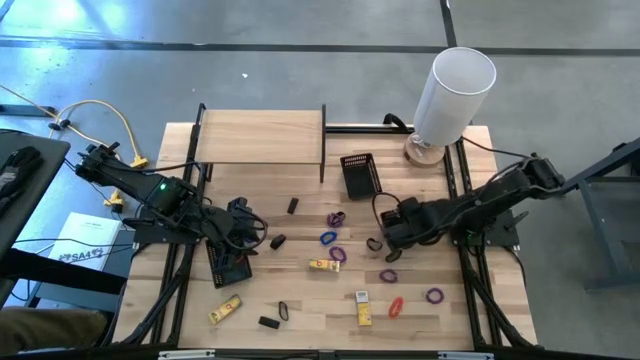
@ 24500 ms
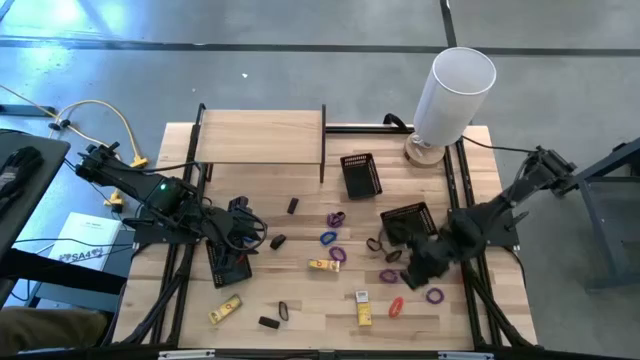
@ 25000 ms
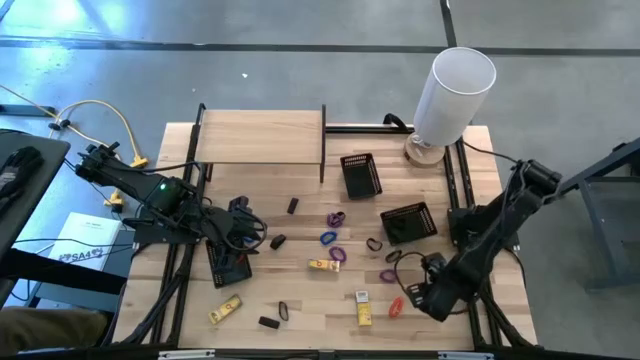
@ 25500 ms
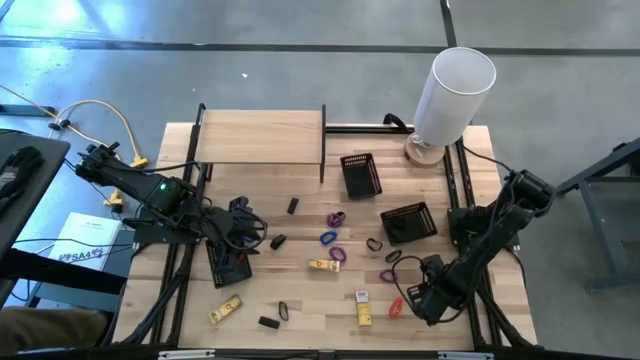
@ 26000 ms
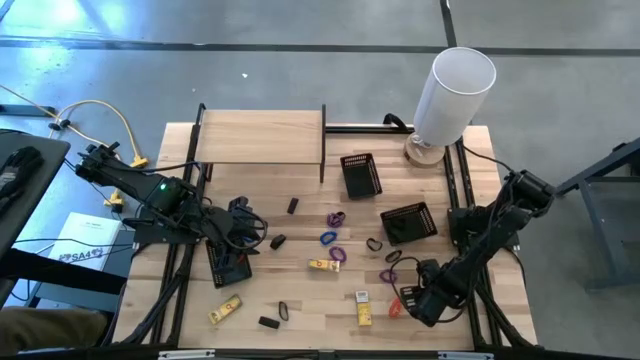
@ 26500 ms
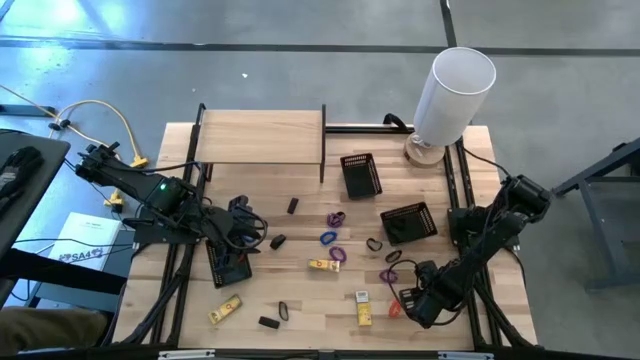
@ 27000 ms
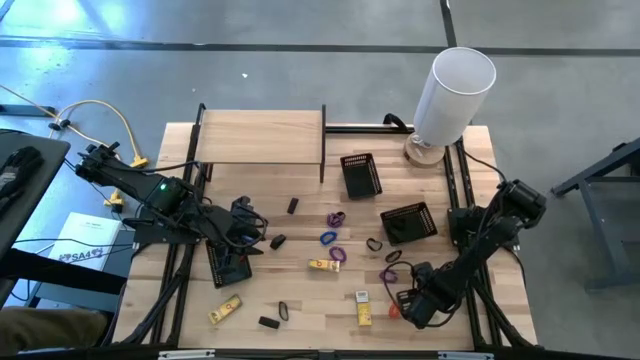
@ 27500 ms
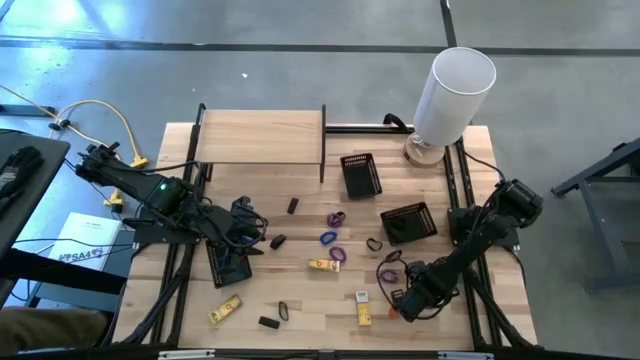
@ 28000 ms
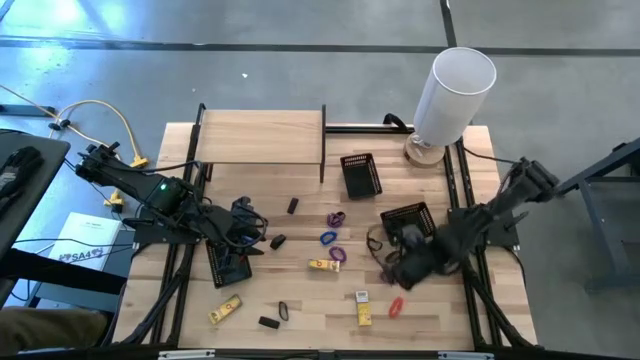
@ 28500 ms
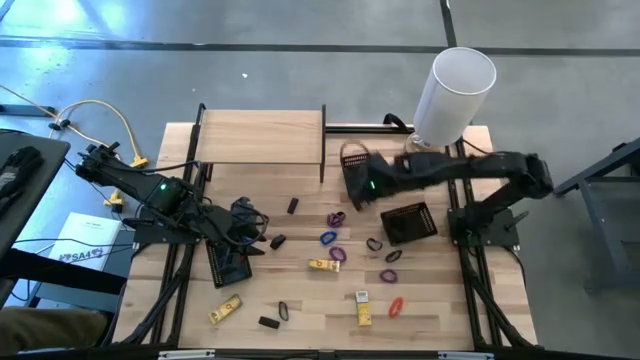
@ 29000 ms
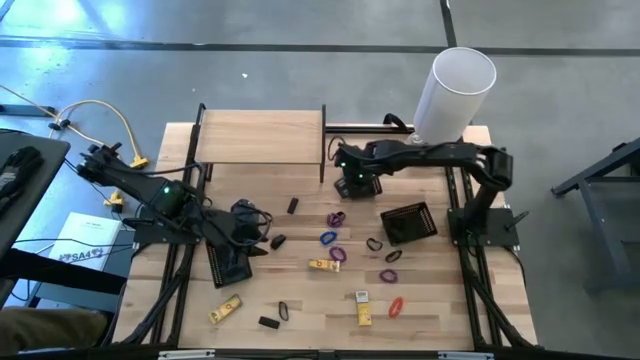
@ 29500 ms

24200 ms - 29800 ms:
Task: Pick & Place Office Desk Supplies
Put the purple spring keychain into the bottom left black bin

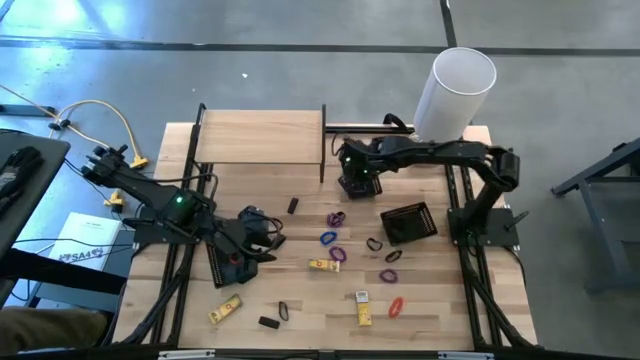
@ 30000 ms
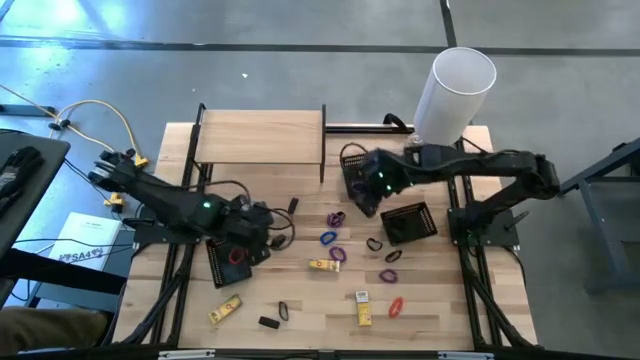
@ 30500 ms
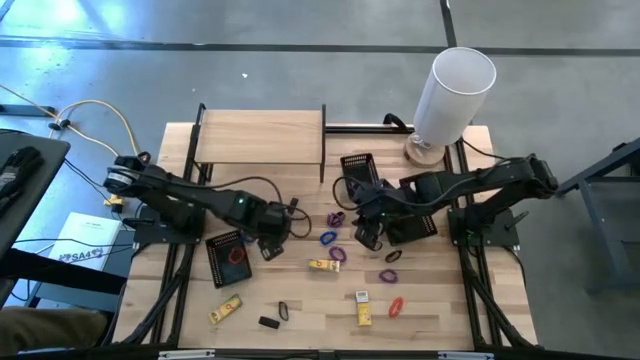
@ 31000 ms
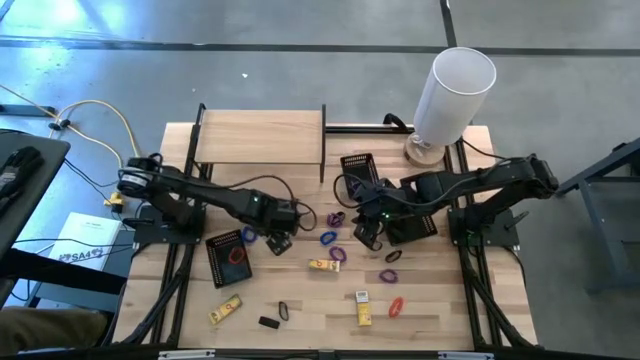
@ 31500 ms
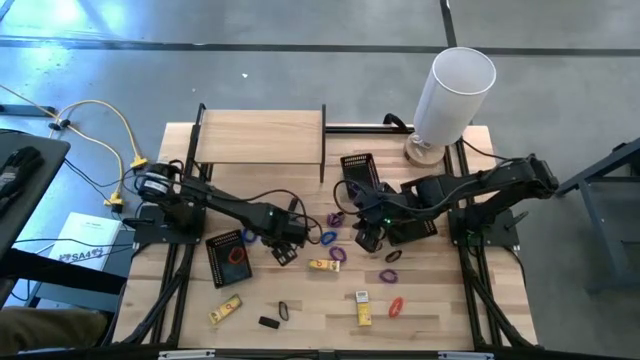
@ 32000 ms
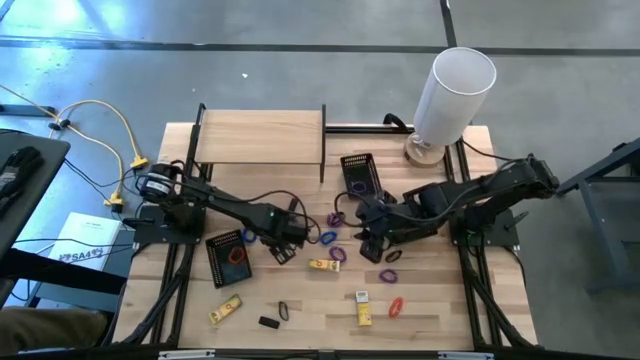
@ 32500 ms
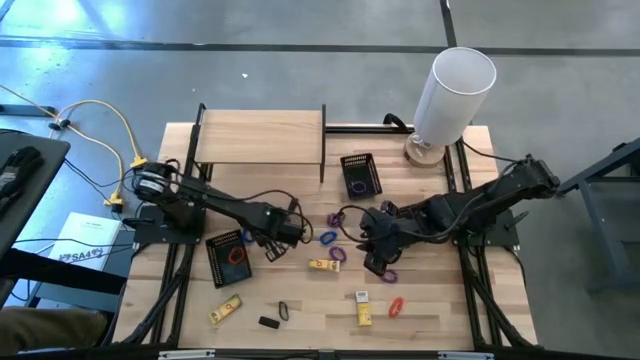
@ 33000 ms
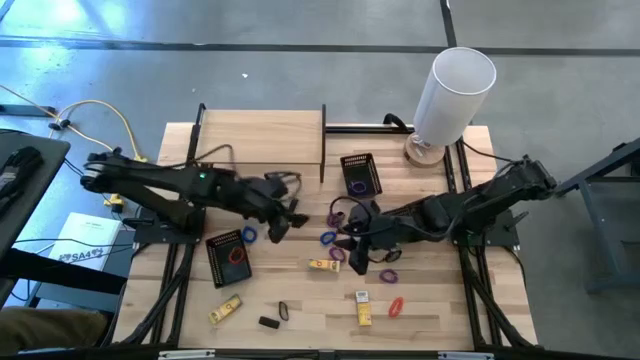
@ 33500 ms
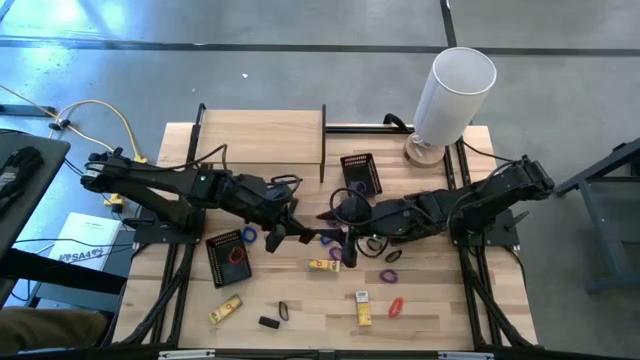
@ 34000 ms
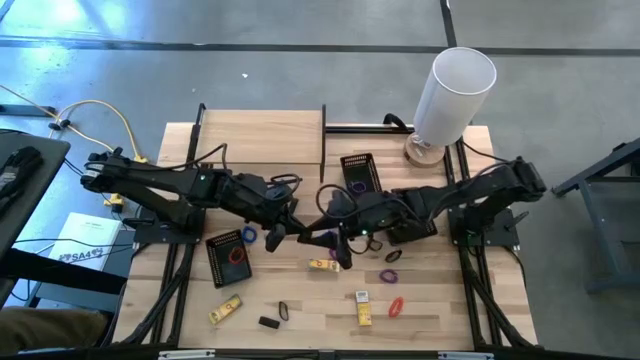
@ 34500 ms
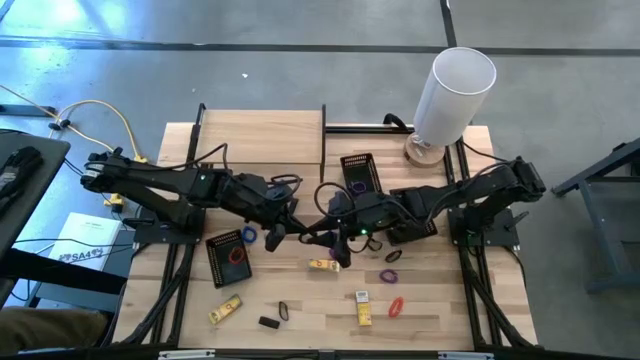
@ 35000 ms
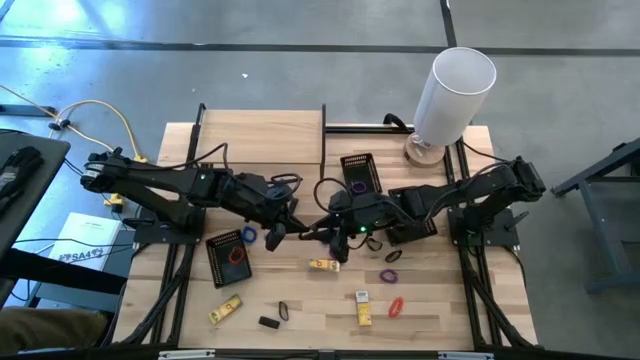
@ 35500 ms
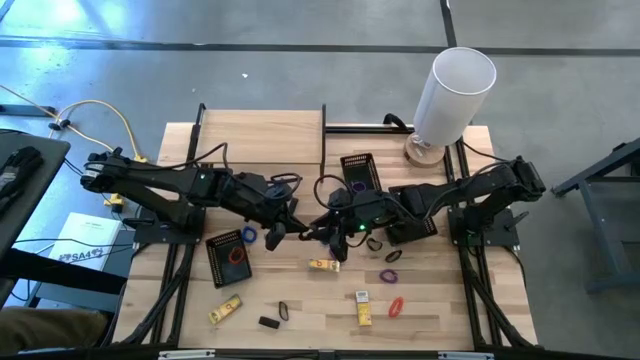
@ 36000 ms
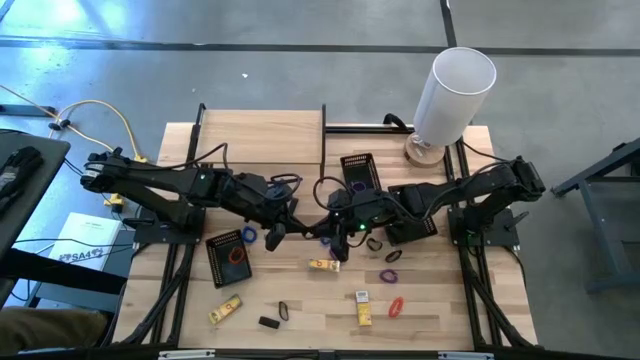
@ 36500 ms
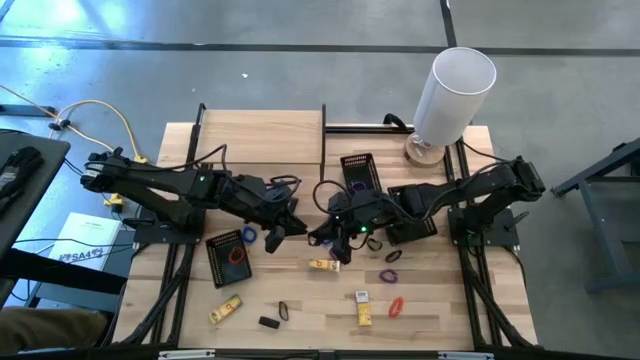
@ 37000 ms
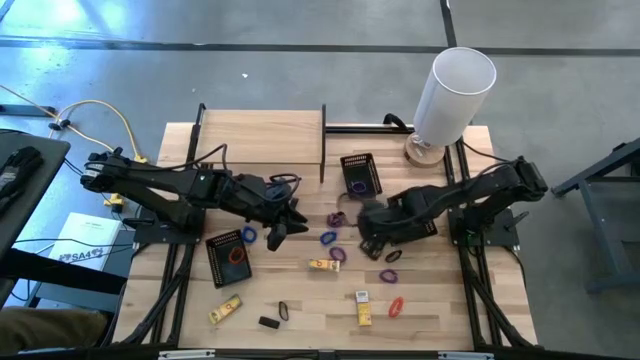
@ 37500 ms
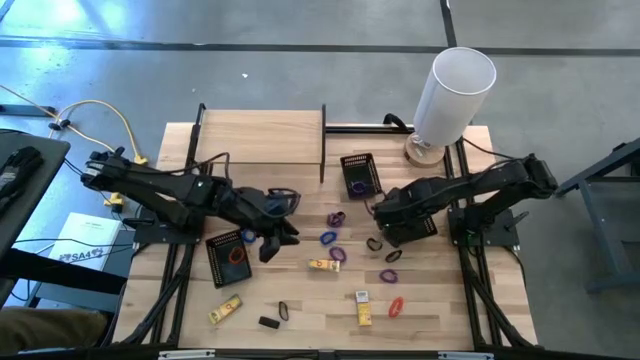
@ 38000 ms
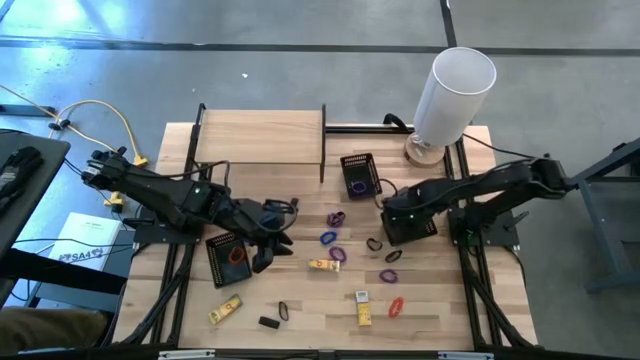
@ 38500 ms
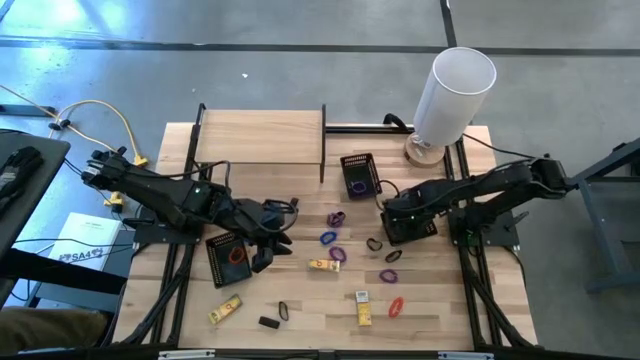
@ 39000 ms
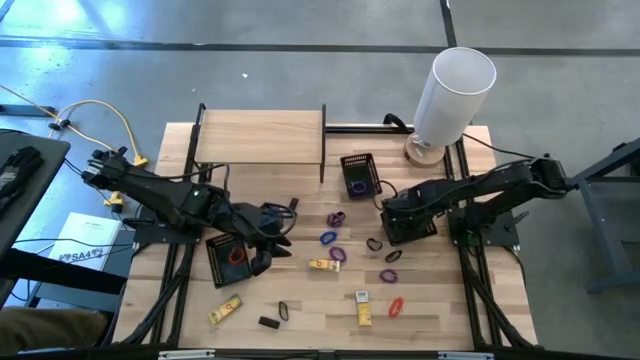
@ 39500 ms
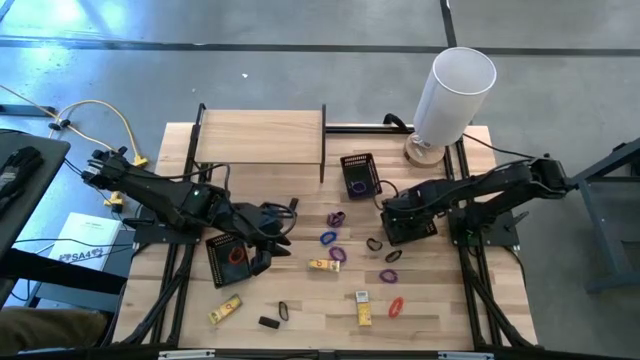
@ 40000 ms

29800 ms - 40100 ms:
Put the black rubberband into the bottom right black bin

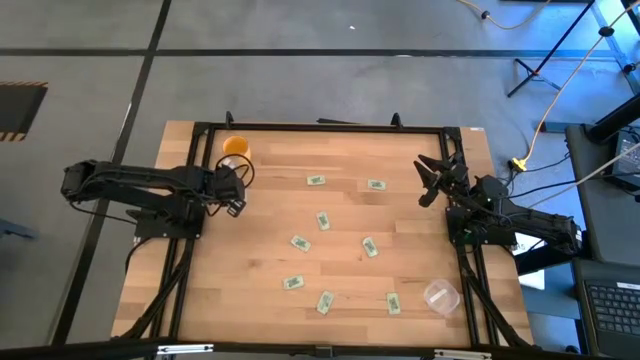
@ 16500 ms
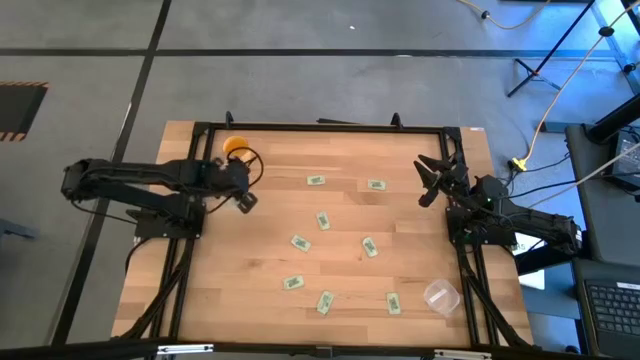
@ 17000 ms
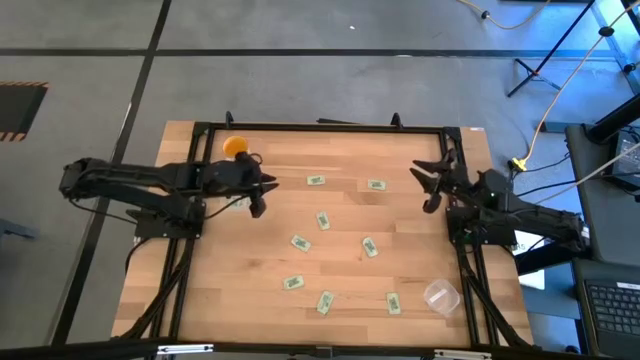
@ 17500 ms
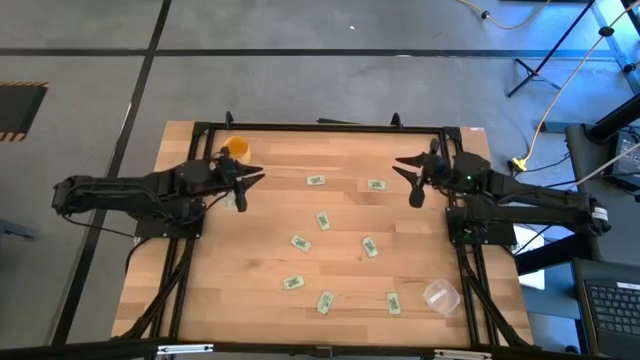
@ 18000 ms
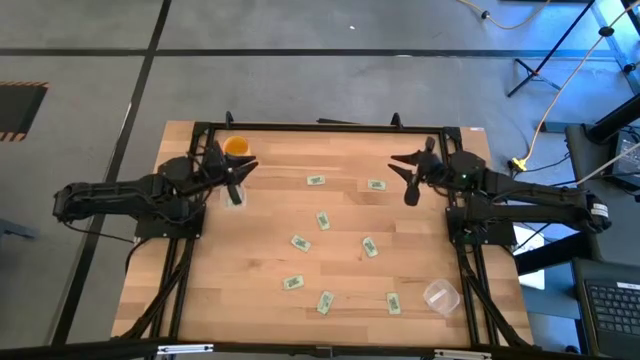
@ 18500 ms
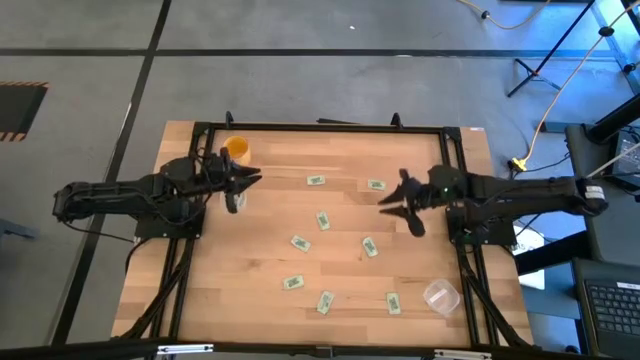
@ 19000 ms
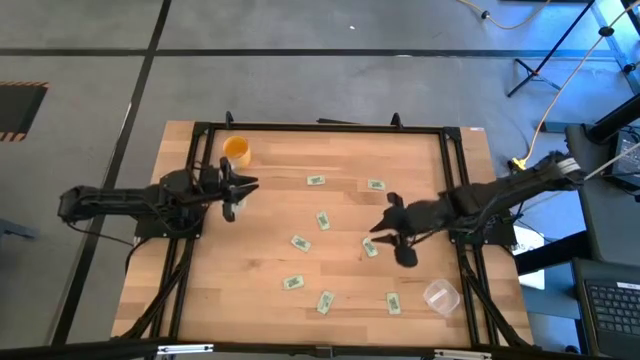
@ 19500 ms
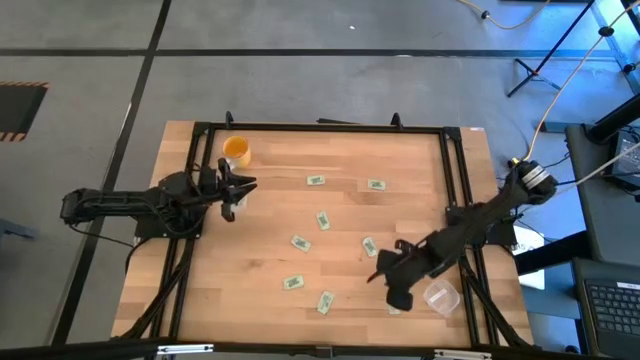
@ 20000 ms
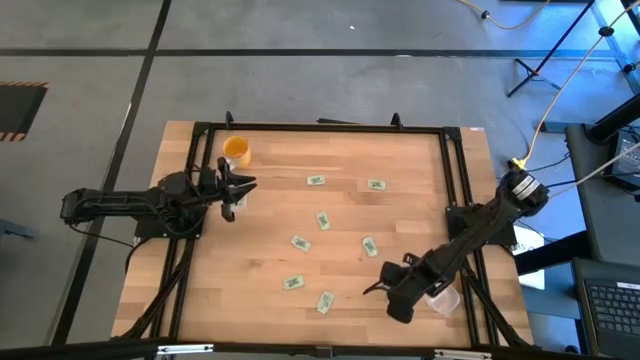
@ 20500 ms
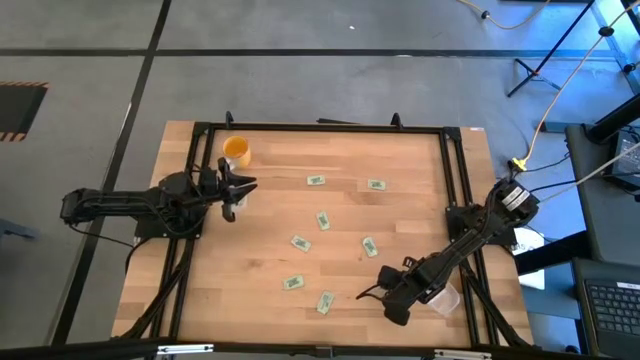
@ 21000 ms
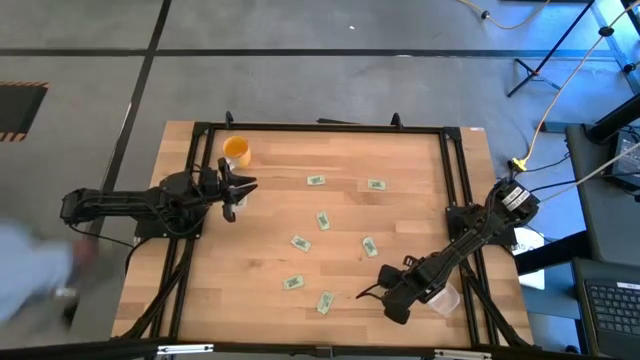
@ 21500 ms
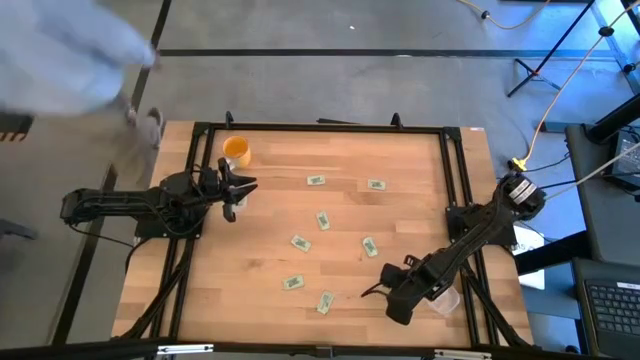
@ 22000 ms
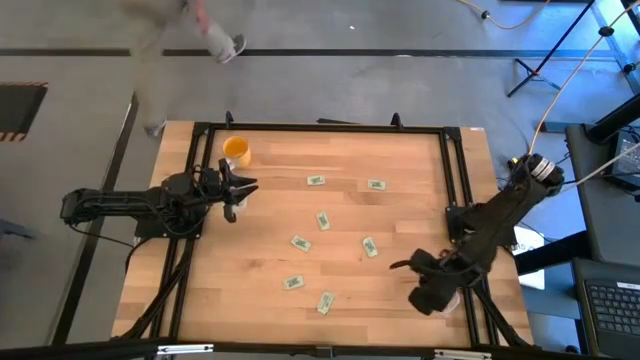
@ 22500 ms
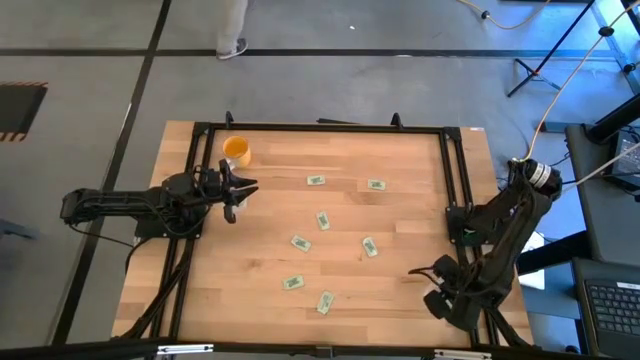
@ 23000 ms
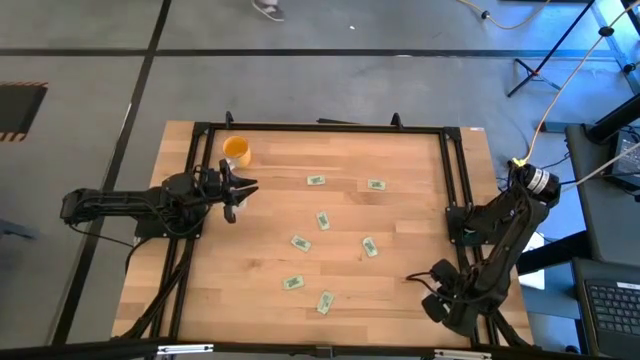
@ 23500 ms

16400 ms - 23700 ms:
Task: Pick and place items into bin
Put the green stevia packet into the bottom transparent bin
